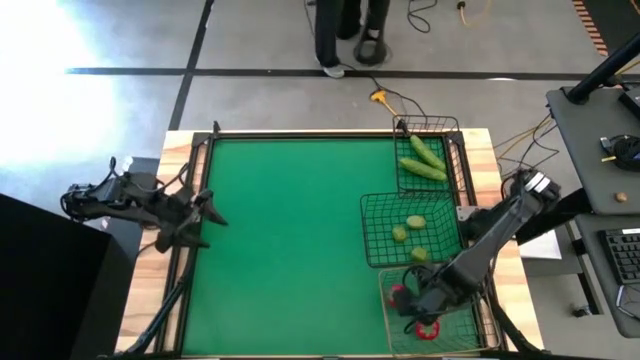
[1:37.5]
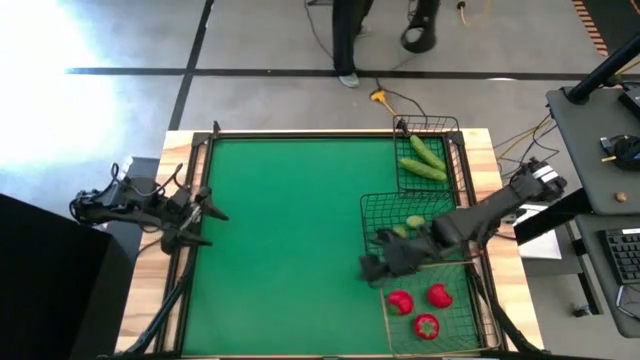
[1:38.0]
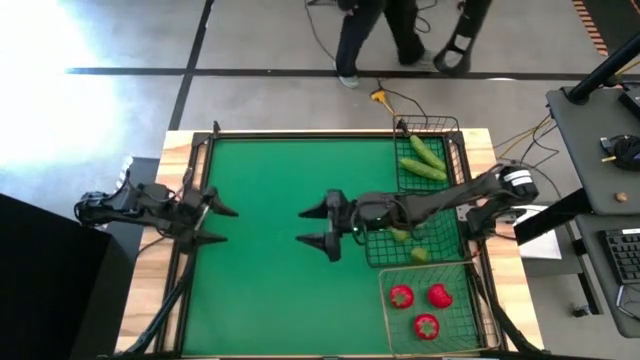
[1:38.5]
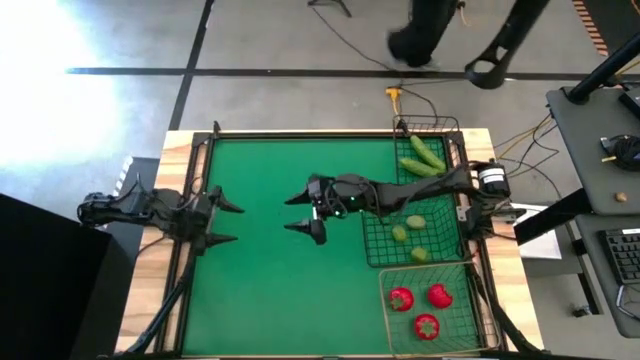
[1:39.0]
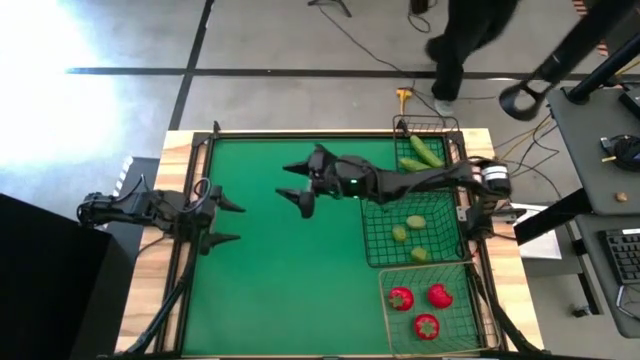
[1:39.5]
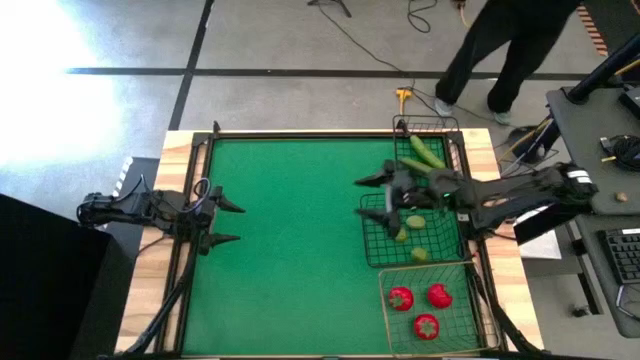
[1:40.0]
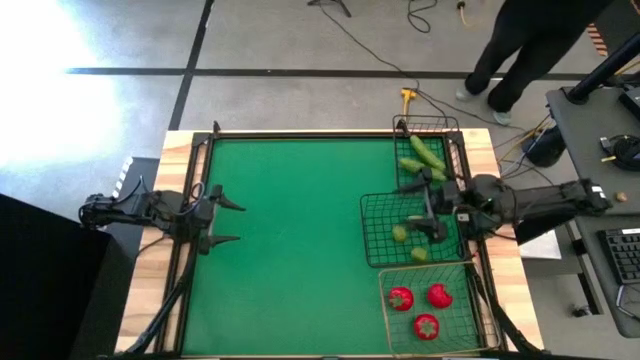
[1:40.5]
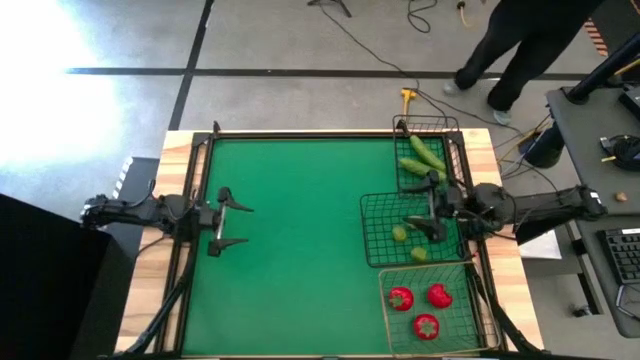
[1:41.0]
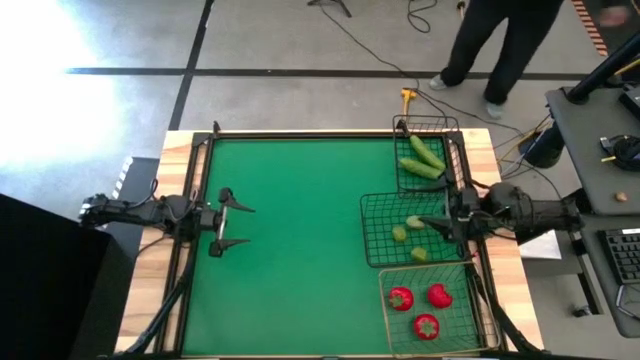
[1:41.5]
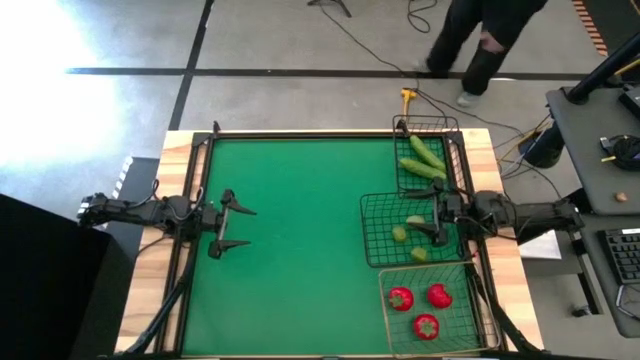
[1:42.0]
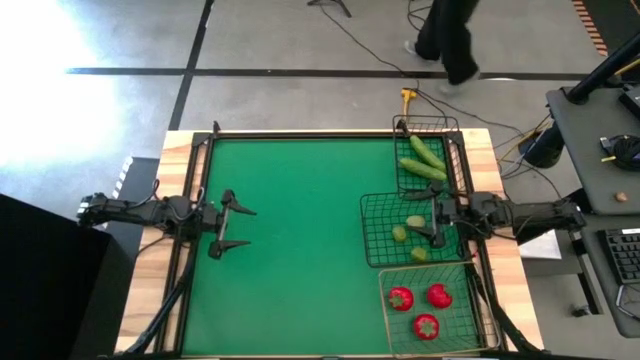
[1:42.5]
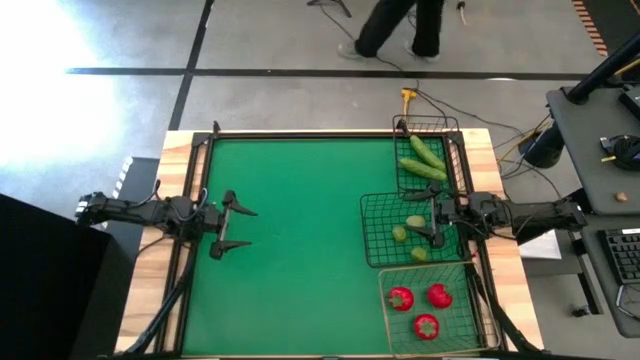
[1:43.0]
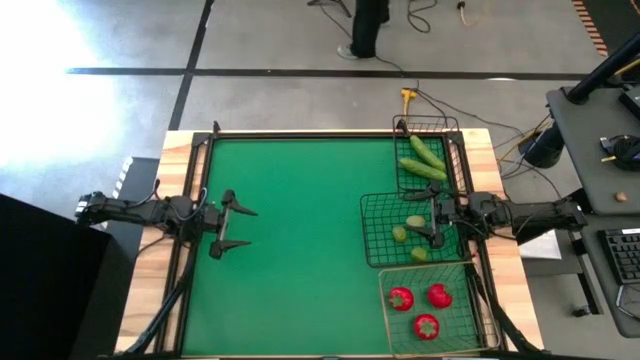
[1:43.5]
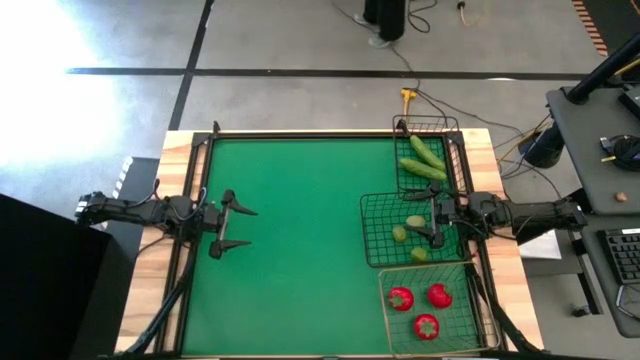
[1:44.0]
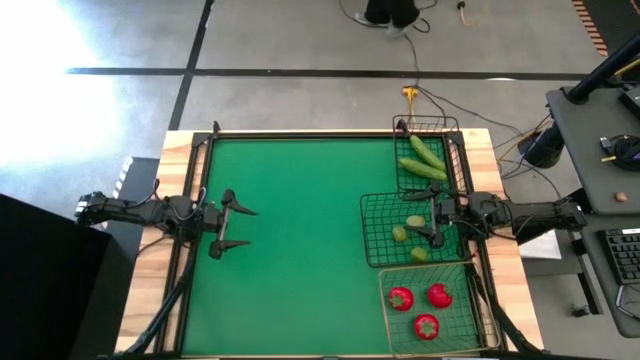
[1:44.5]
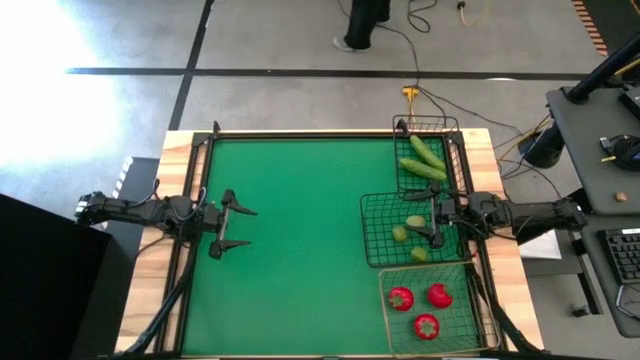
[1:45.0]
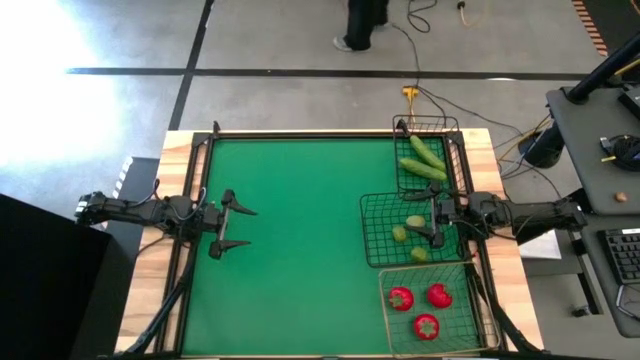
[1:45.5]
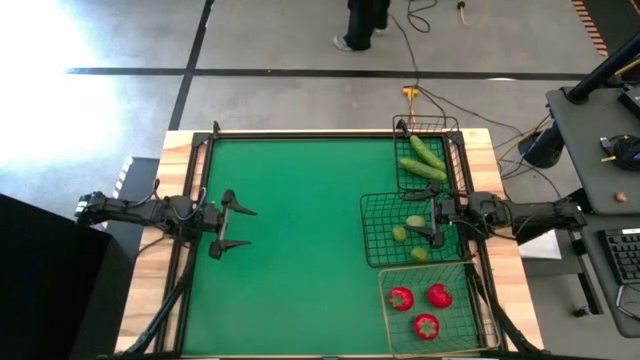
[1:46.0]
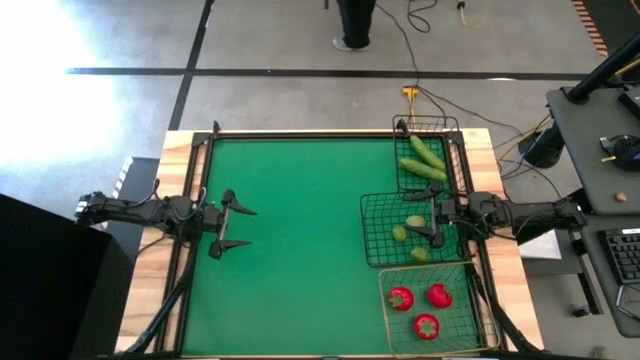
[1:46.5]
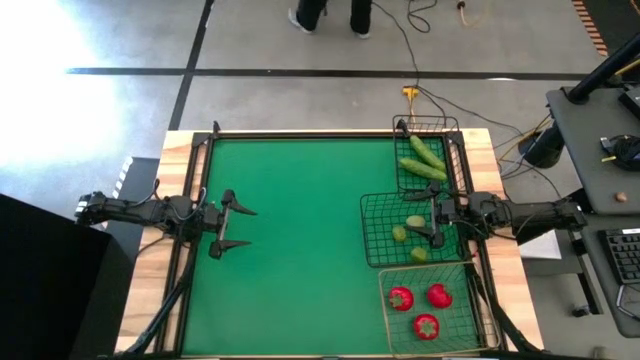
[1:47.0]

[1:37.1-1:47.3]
Task: Sort produce into baskets
Return to Home Position

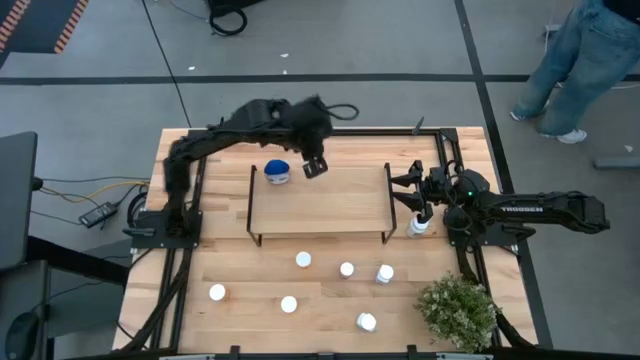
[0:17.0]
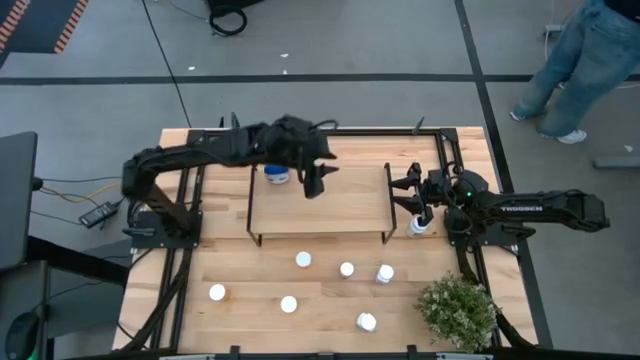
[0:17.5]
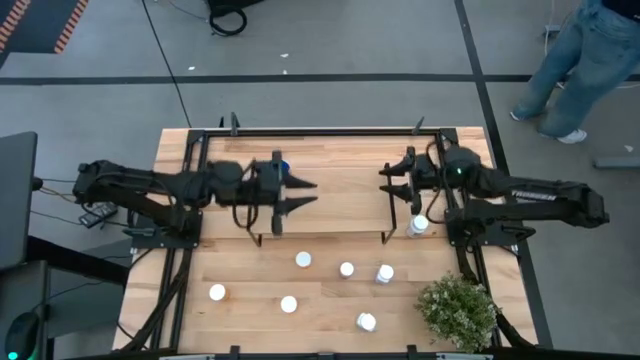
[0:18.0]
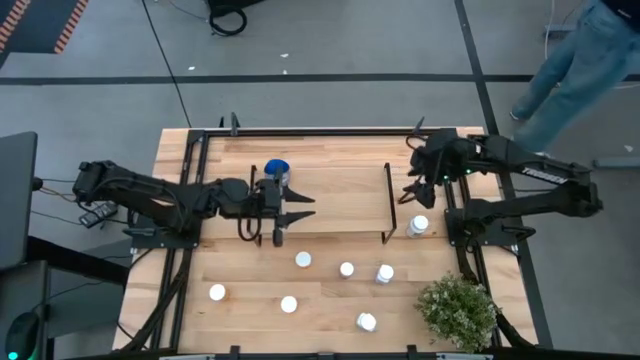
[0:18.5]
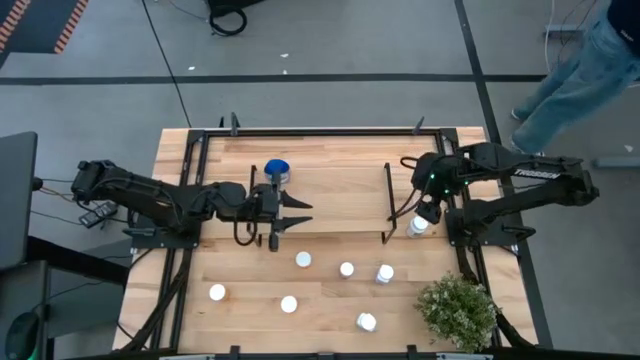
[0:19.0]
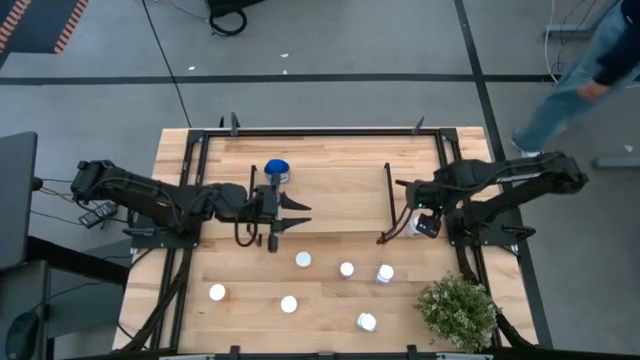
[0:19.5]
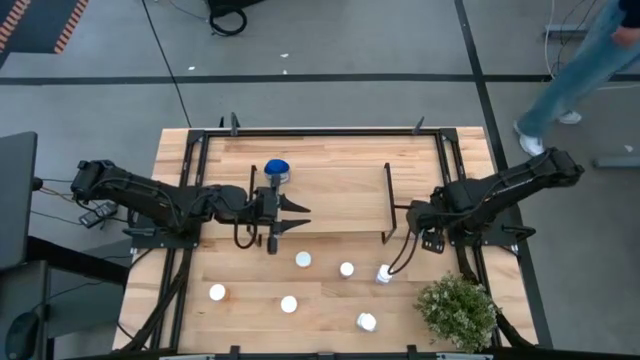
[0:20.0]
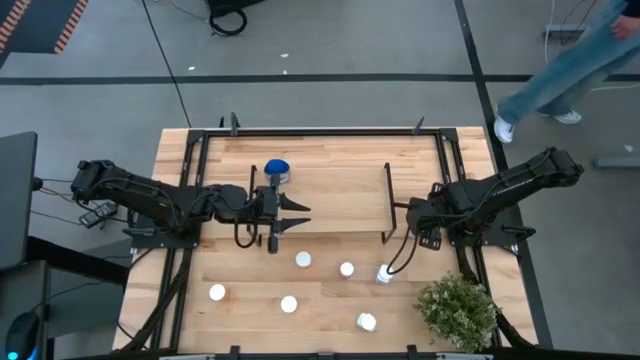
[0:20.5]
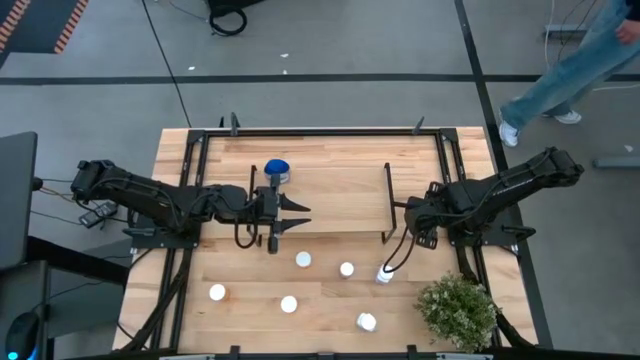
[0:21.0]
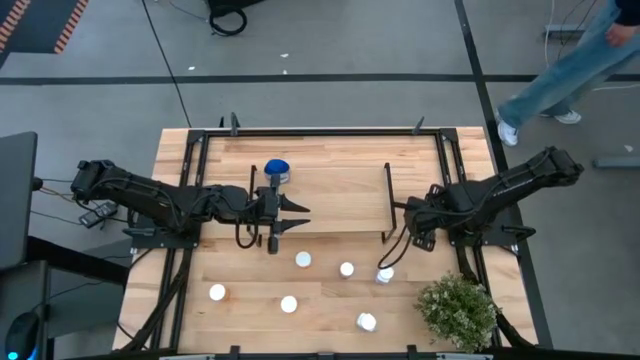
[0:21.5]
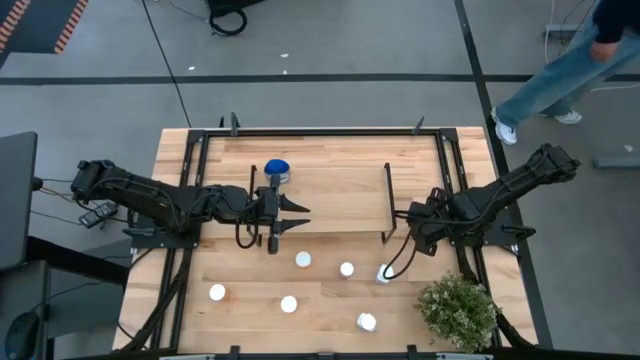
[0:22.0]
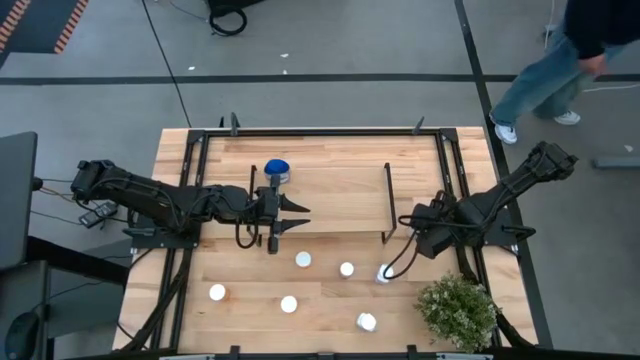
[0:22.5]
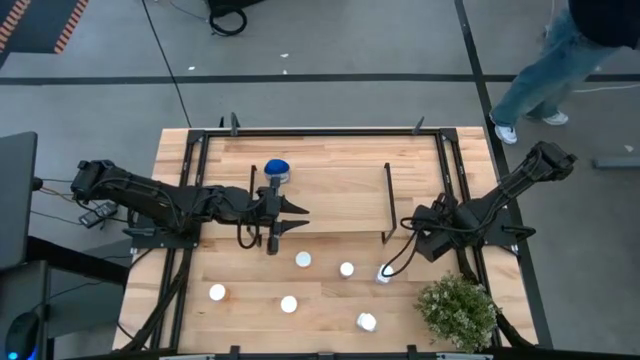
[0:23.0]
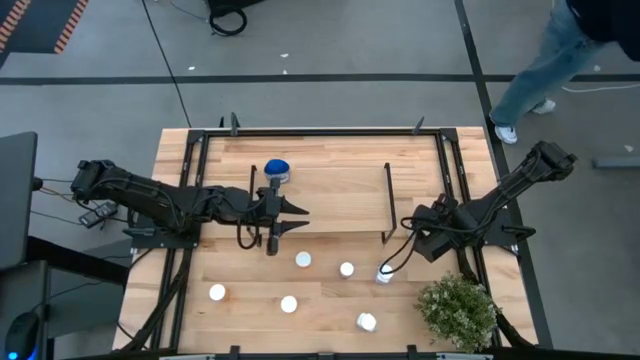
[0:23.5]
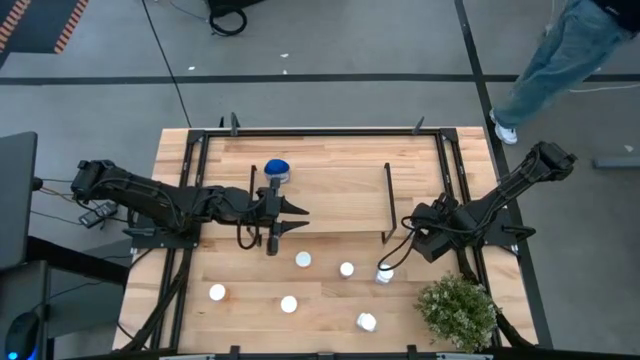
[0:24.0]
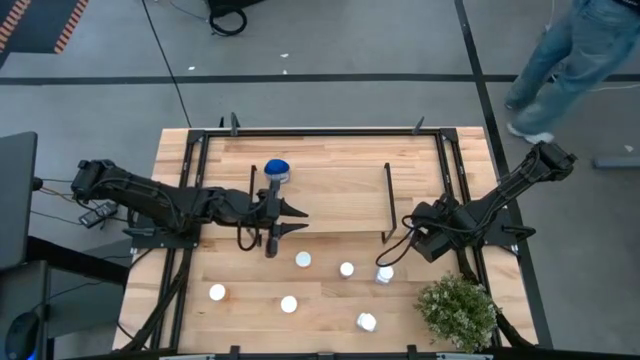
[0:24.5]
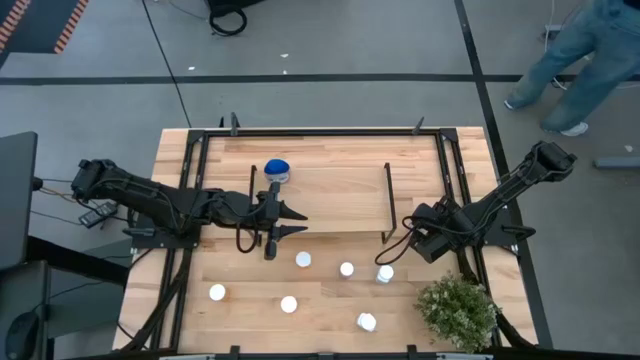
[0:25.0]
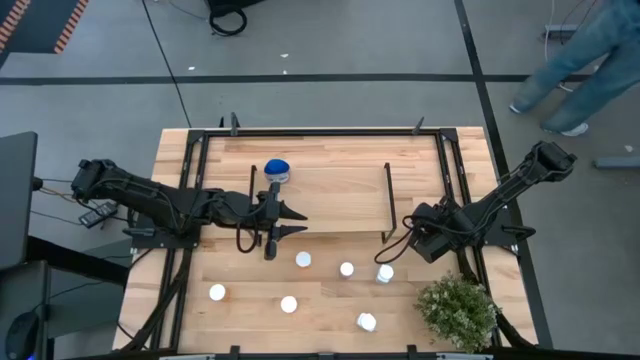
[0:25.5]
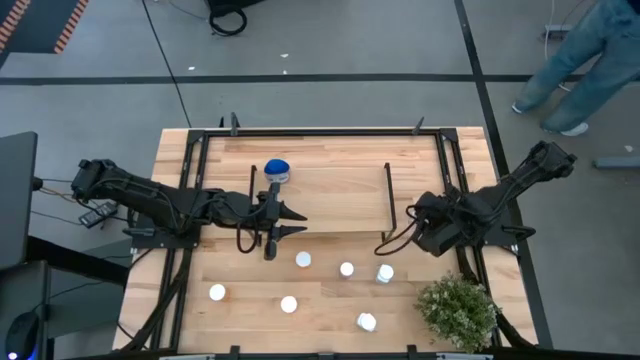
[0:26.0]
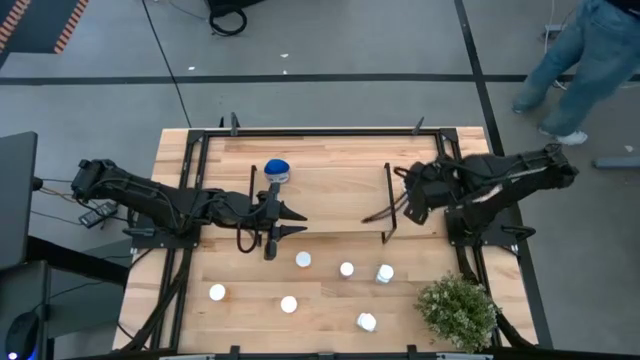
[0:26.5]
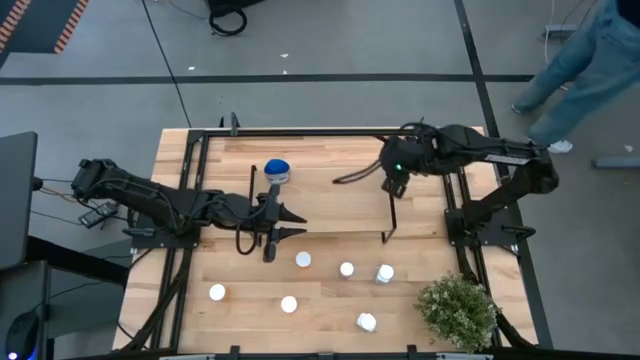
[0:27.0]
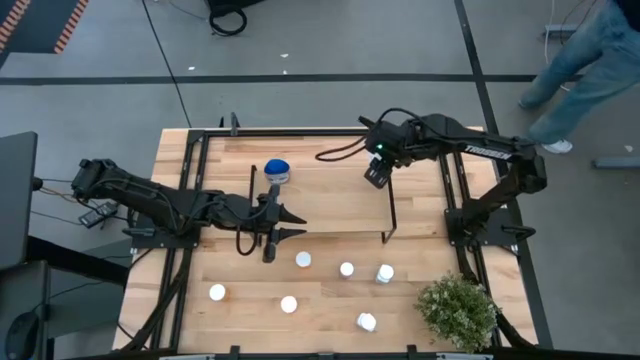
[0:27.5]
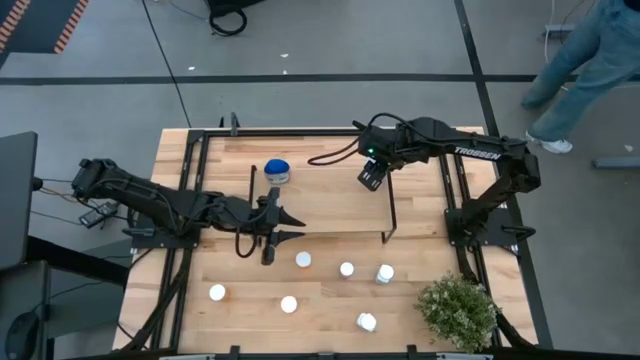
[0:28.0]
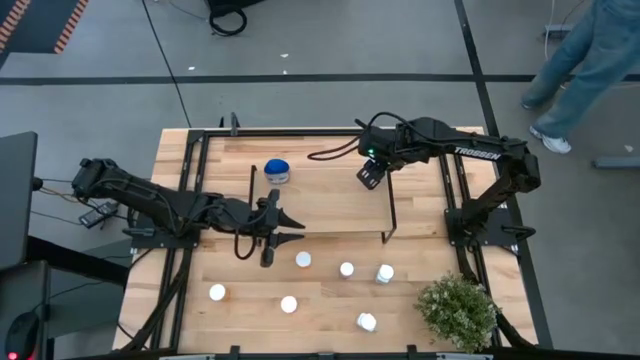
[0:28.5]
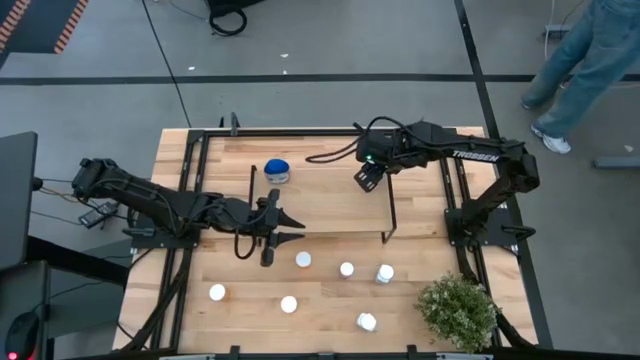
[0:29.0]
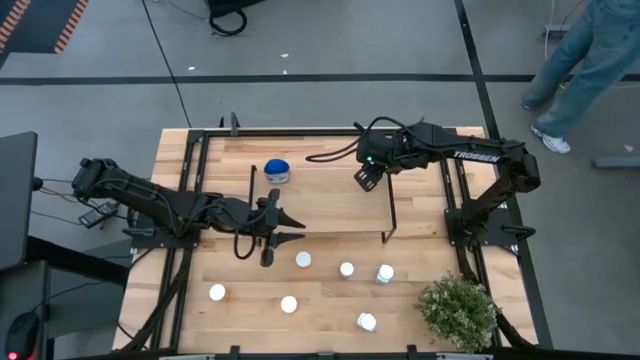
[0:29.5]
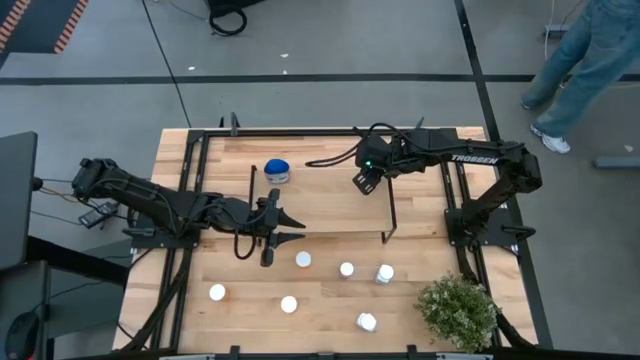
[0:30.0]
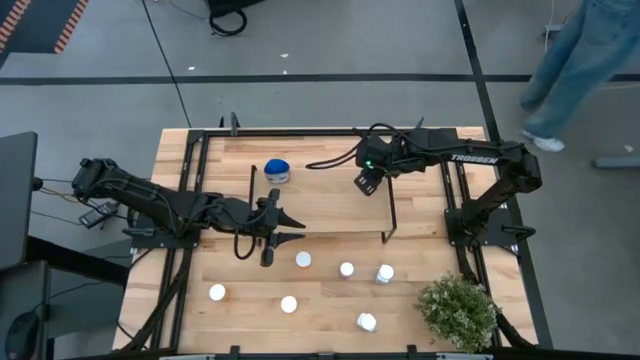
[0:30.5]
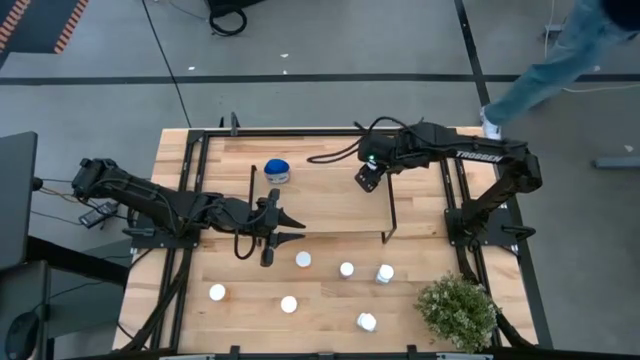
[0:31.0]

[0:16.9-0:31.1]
Task: Pick and place medicine bottles onto shelf by color
Put the white medicine bottle on the shelf
